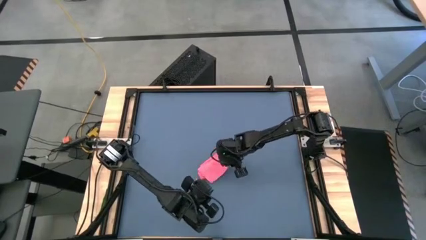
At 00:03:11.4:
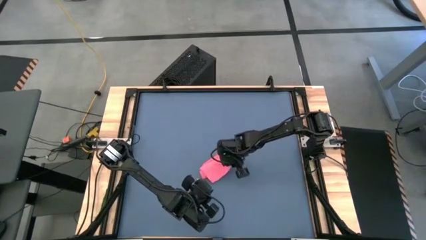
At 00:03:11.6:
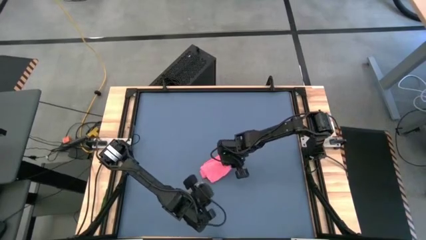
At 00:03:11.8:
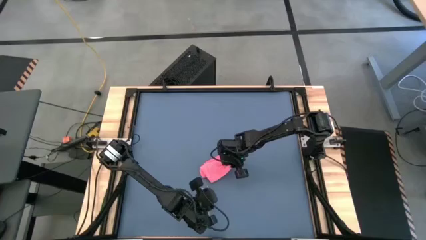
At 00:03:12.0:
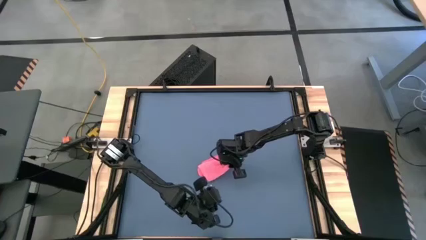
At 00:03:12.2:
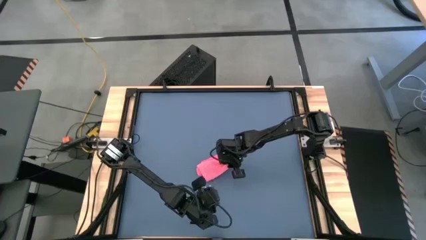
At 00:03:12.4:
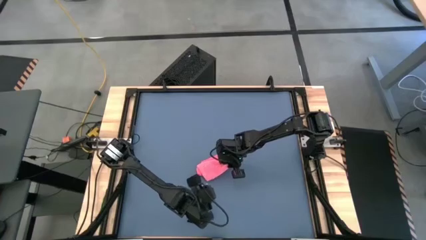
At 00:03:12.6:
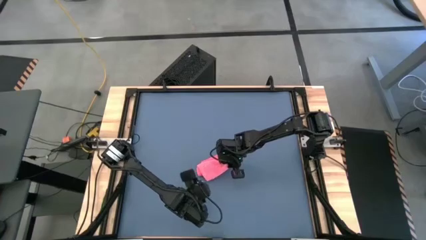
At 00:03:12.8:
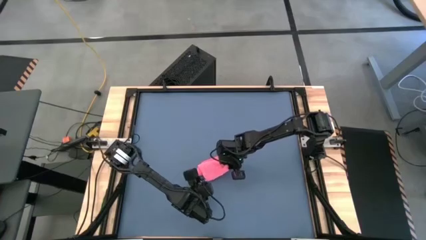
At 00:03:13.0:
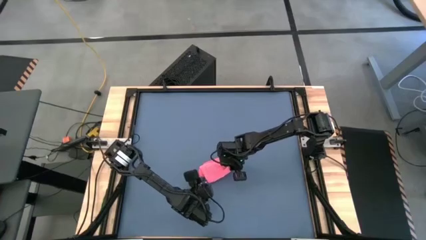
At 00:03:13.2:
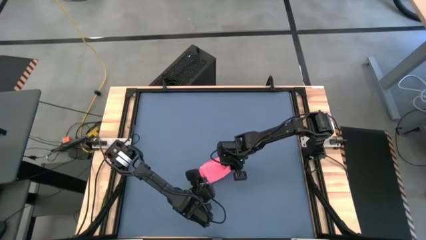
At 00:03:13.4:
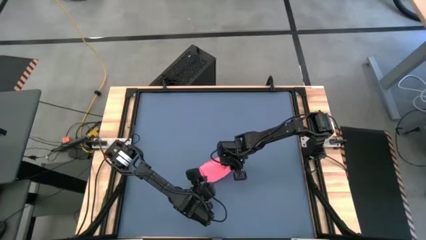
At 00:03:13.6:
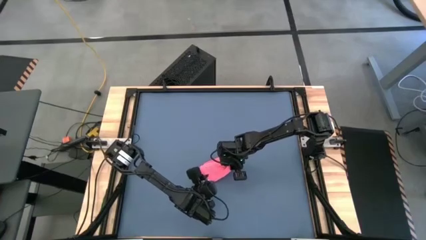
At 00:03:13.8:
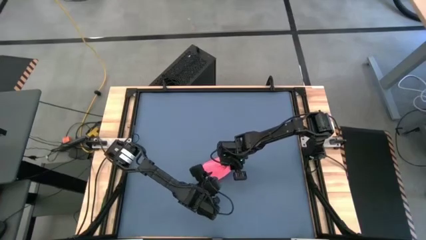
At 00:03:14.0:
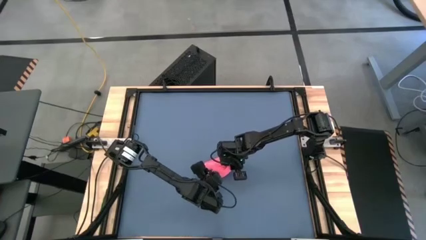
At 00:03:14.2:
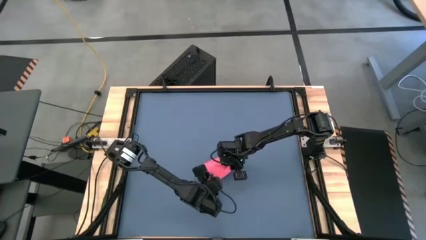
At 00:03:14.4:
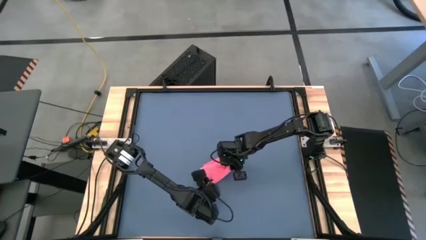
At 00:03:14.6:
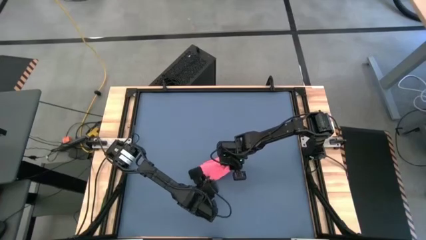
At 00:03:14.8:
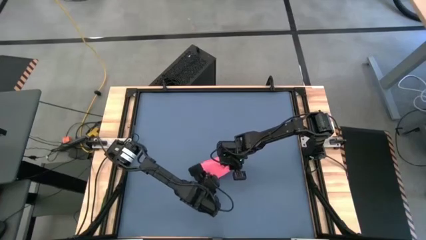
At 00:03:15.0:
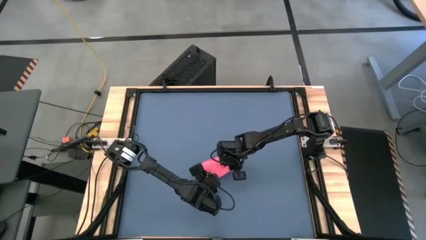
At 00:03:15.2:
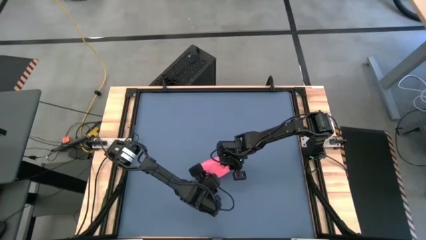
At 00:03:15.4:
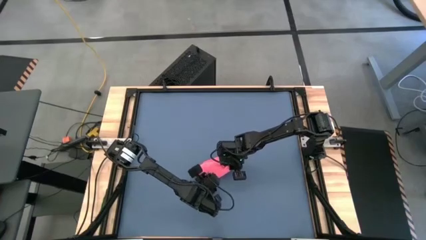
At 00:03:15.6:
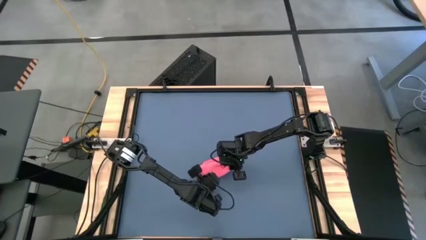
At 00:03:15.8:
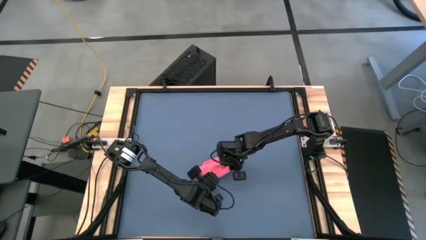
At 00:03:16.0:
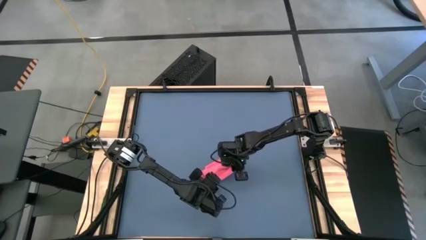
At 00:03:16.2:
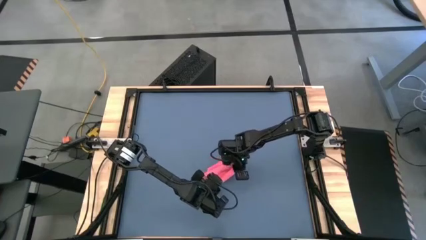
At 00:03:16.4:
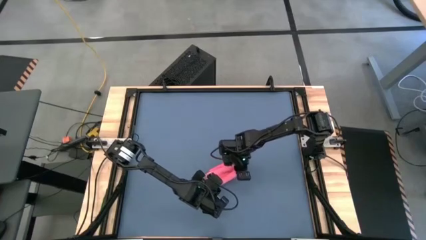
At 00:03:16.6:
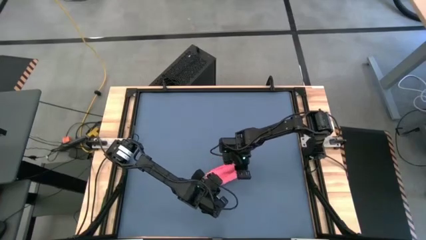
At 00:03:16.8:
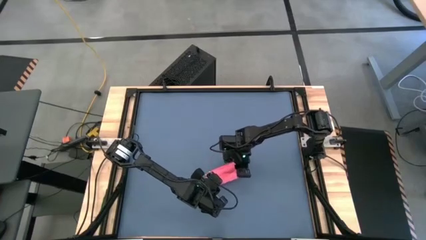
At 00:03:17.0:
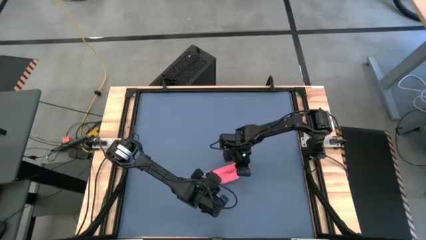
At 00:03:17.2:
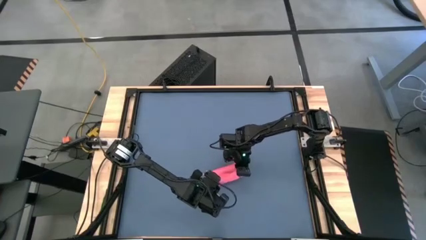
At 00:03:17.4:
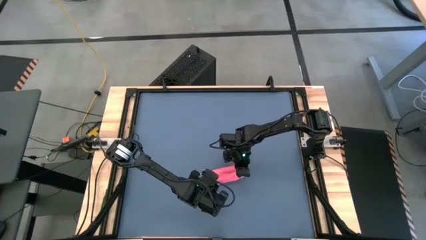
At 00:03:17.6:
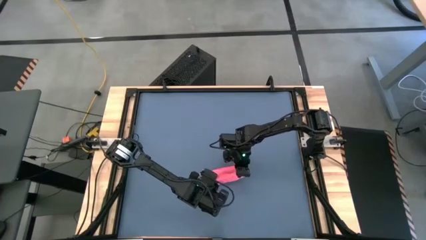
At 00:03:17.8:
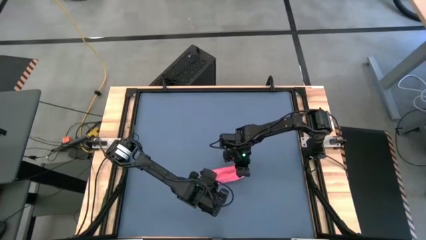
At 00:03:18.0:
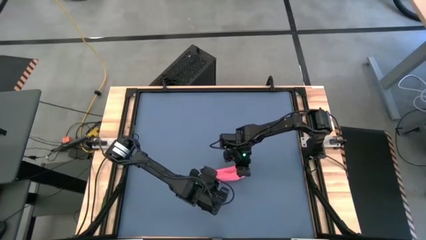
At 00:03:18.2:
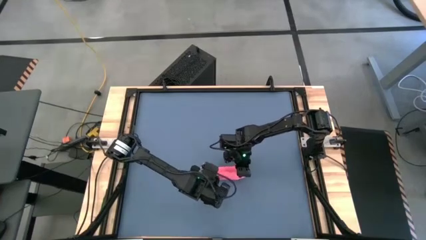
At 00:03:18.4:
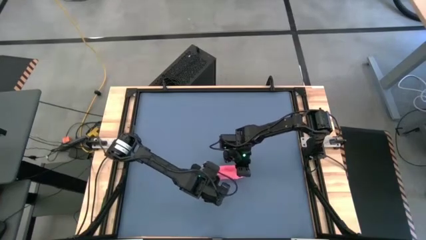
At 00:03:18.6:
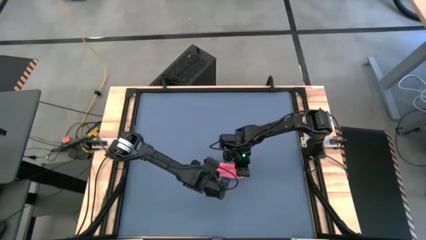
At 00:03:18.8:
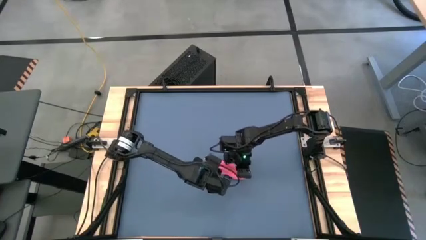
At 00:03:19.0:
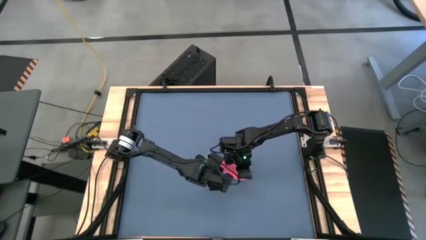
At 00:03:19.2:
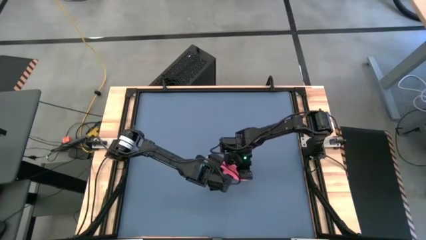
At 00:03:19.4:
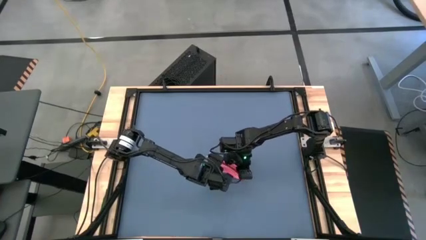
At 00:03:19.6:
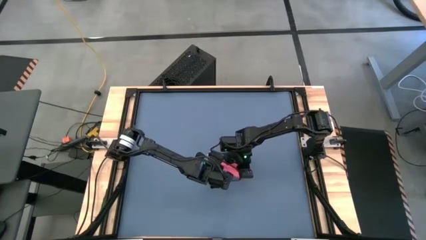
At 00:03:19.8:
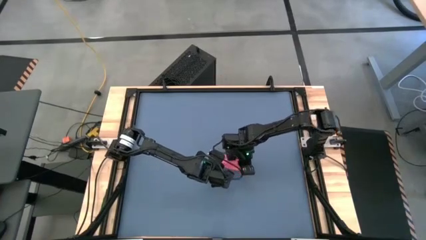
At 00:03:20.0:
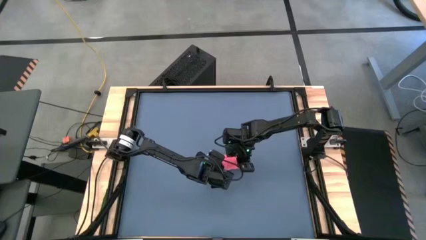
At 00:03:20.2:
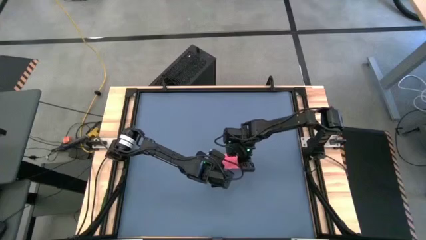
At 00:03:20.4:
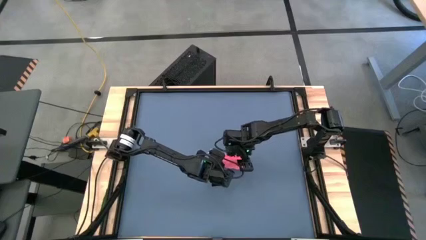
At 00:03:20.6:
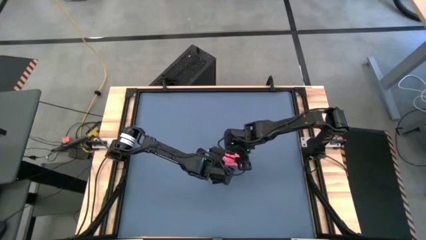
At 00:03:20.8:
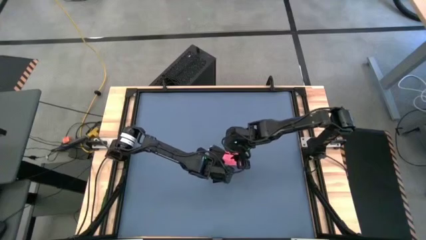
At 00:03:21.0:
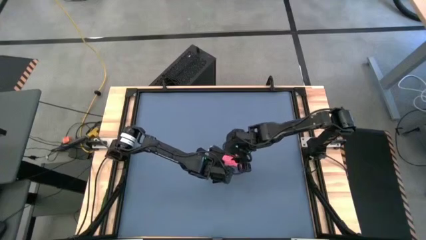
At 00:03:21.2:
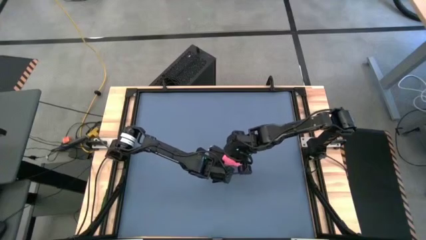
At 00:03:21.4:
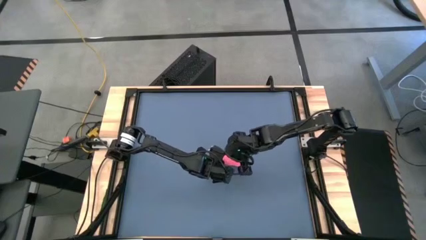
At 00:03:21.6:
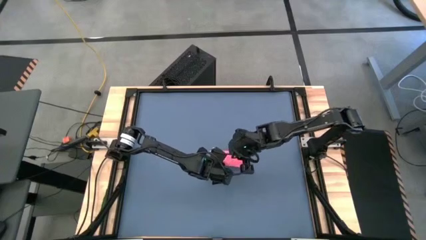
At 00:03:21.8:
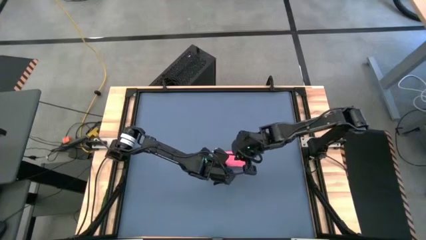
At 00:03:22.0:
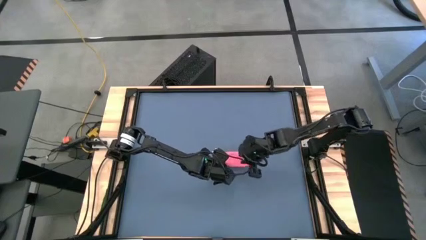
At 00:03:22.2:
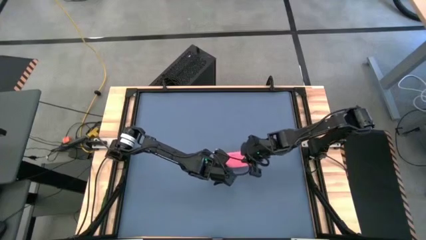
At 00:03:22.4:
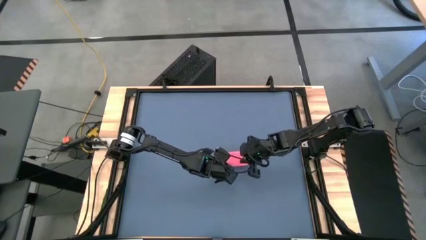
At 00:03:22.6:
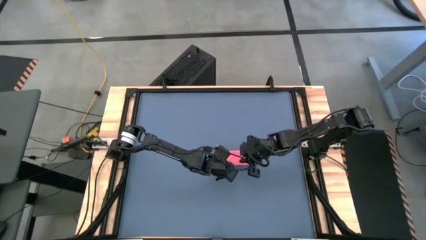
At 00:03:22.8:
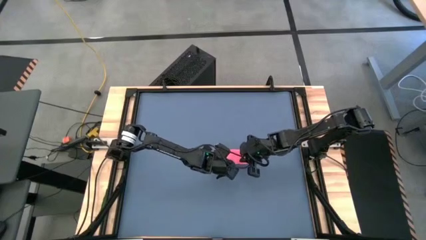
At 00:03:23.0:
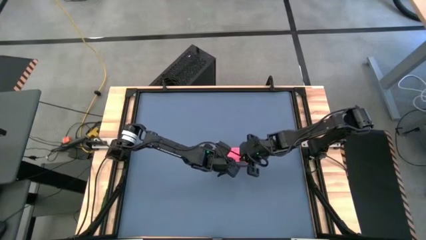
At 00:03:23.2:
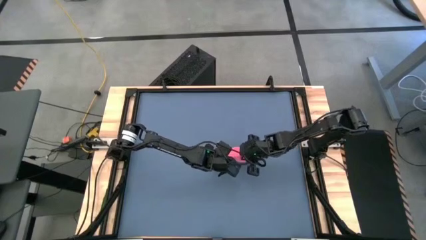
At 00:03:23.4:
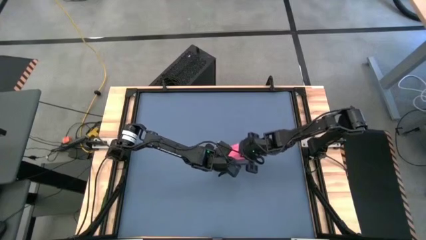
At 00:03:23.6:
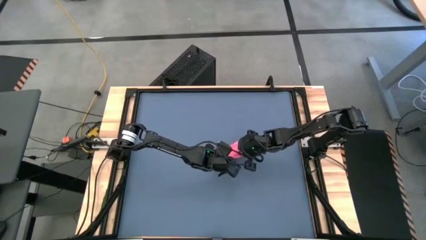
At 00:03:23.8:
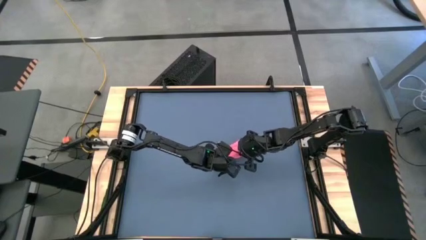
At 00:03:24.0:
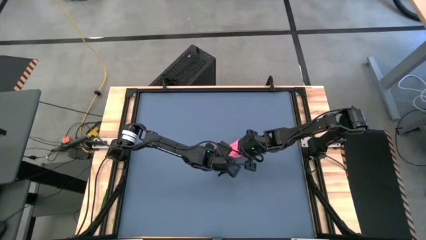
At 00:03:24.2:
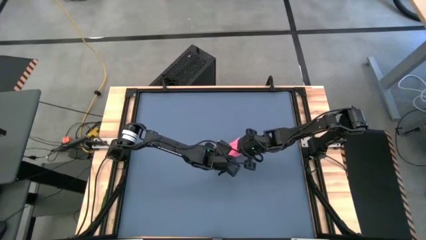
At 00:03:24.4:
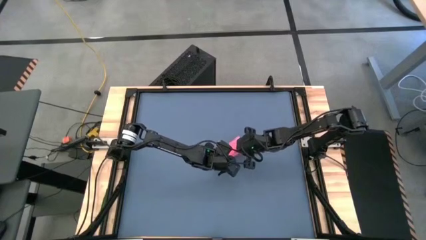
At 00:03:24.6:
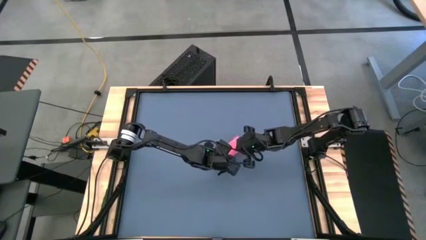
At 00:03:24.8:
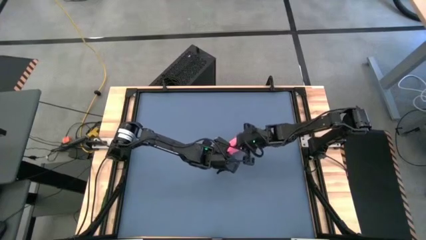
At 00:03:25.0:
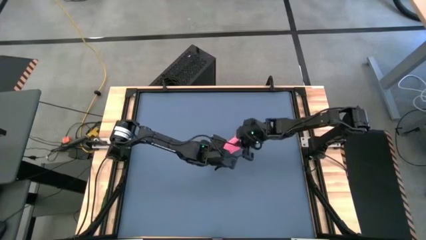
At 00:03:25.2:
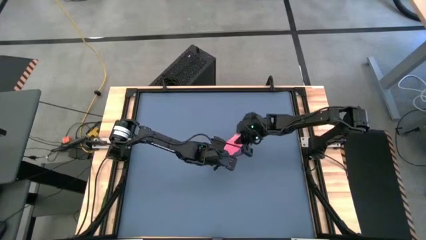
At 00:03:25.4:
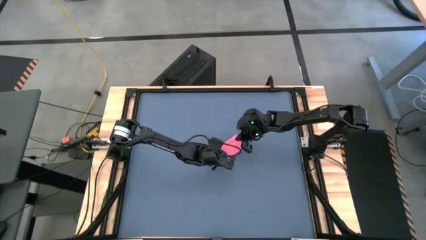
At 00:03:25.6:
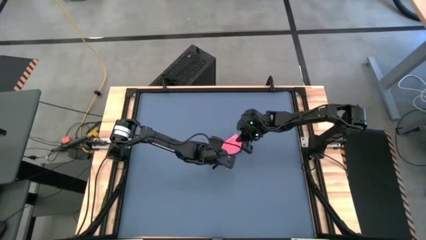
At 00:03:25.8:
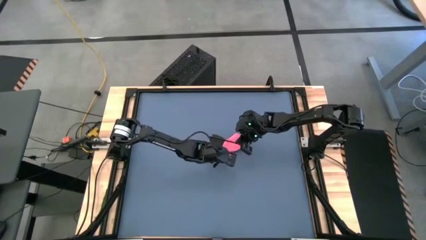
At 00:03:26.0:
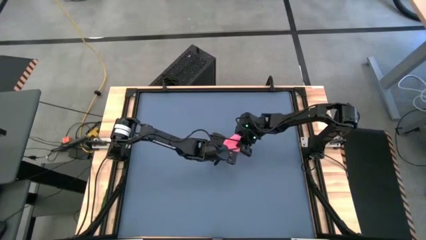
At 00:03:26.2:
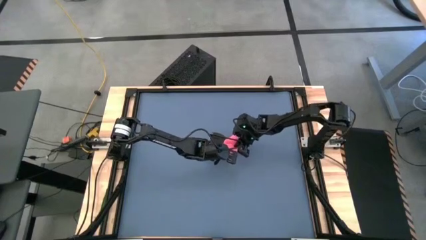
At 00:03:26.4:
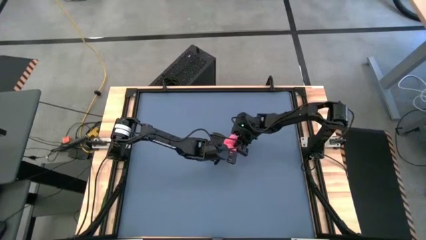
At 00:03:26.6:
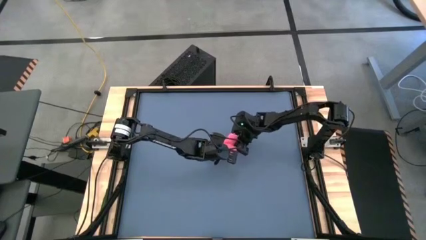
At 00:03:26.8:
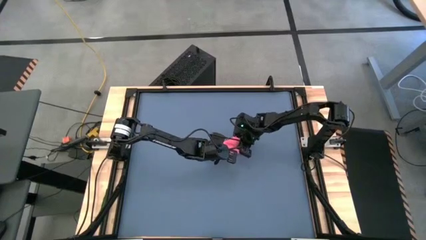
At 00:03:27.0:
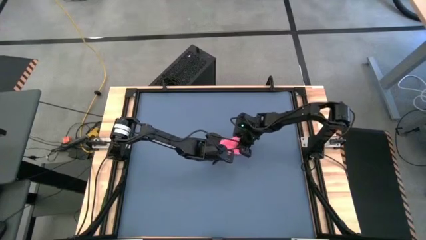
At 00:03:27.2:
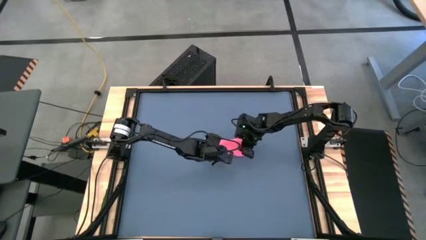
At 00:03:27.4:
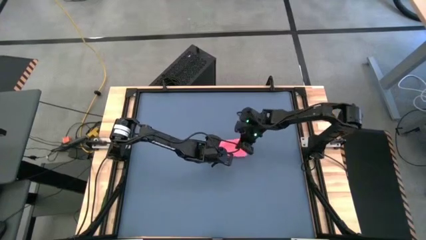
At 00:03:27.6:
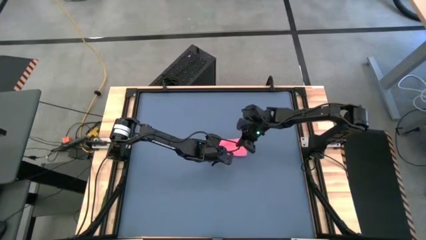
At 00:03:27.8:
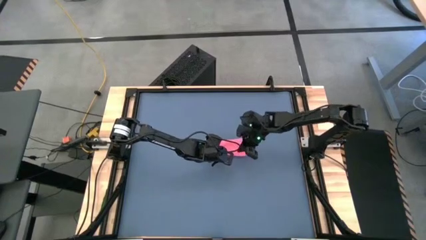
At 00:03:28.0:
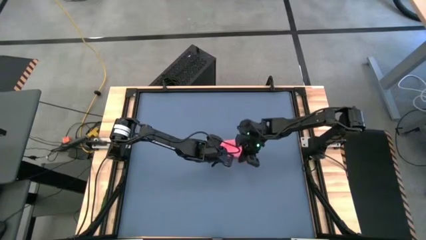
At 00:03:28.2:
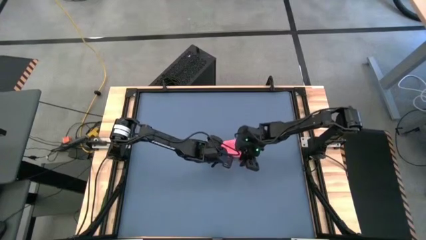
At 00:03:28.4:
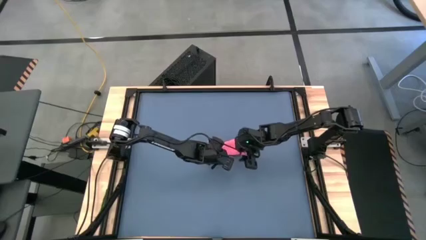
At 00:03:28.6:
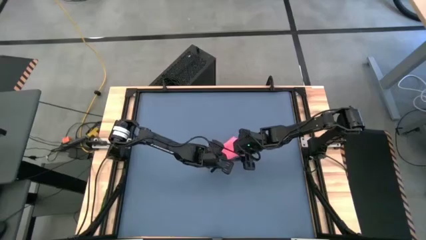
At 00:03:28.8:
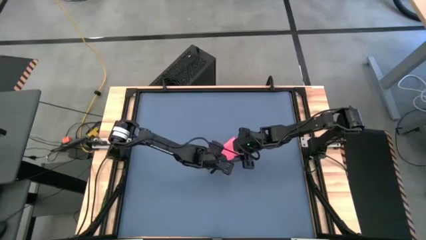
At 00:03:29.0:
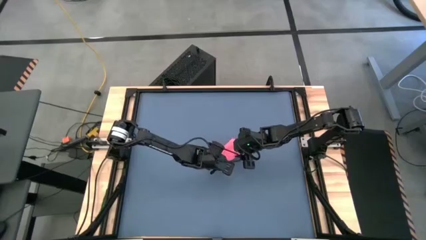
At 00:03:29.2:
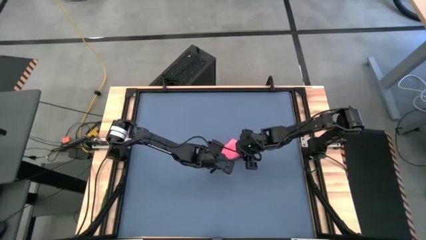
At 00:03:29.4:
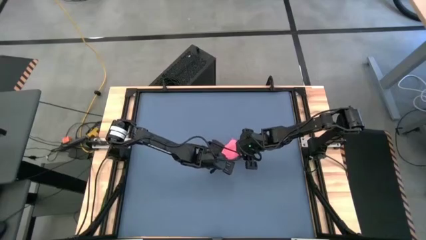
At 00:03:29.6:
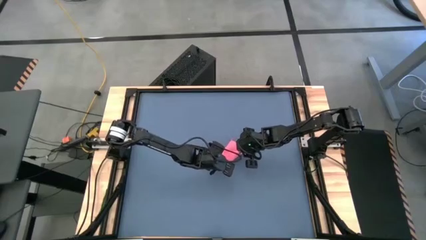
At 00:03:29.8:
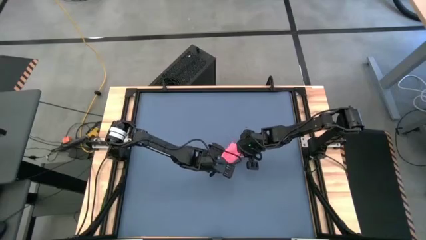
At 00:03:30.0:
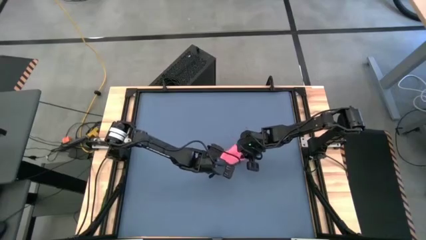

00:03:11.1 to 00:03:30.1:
Task: Roll towel
Roll the pink towel
